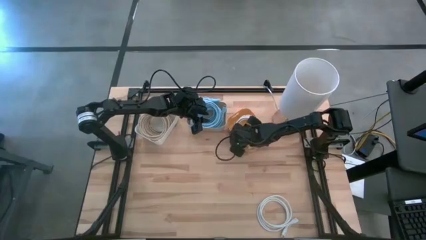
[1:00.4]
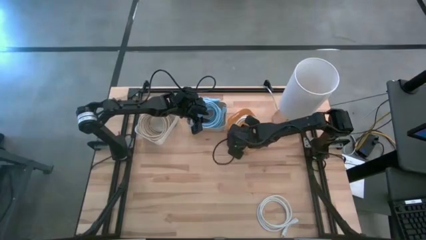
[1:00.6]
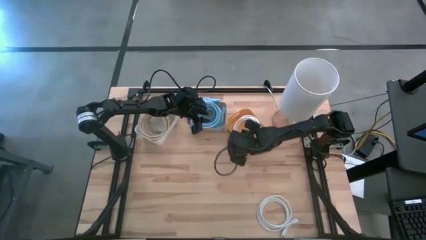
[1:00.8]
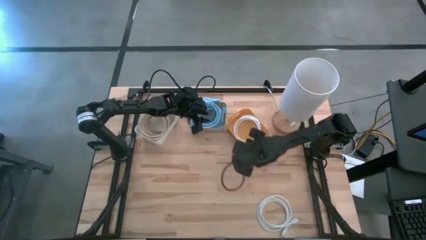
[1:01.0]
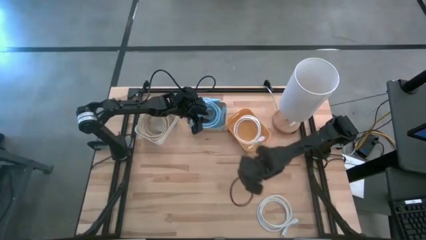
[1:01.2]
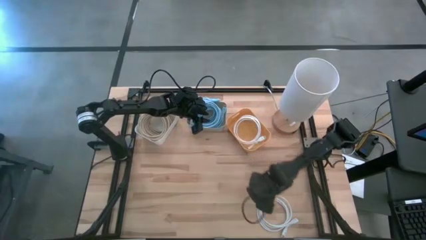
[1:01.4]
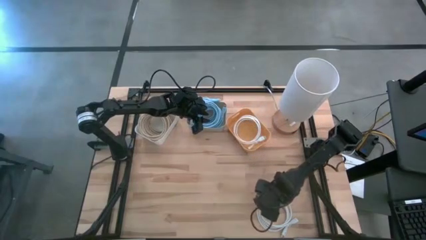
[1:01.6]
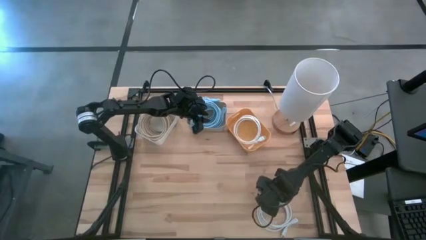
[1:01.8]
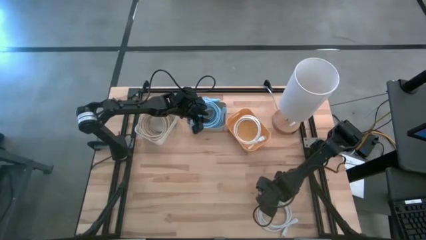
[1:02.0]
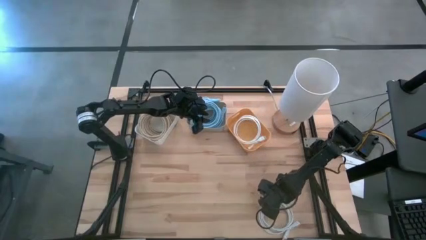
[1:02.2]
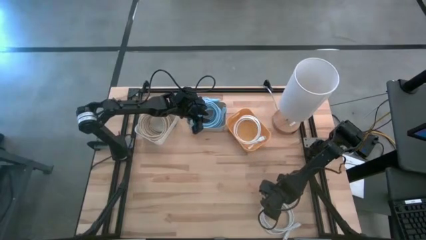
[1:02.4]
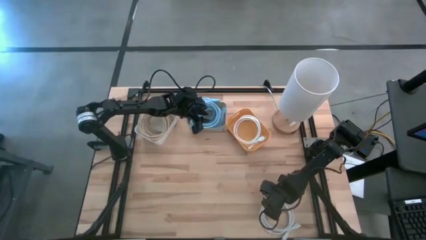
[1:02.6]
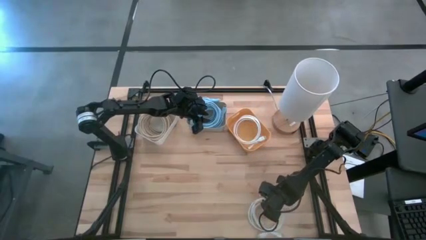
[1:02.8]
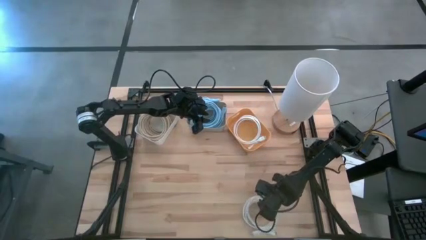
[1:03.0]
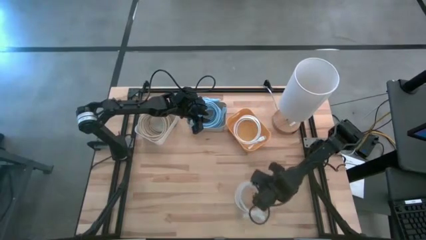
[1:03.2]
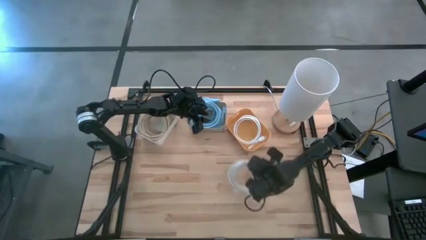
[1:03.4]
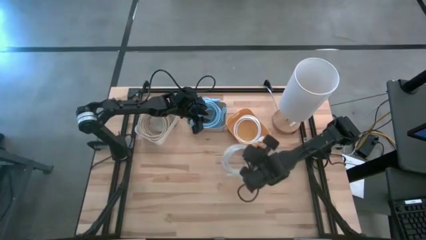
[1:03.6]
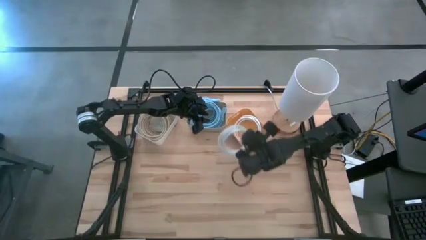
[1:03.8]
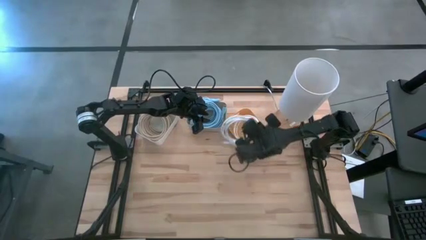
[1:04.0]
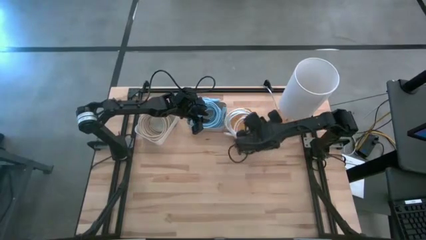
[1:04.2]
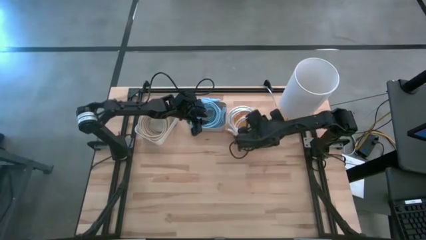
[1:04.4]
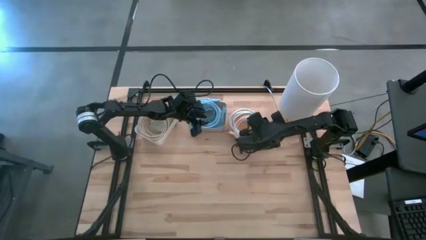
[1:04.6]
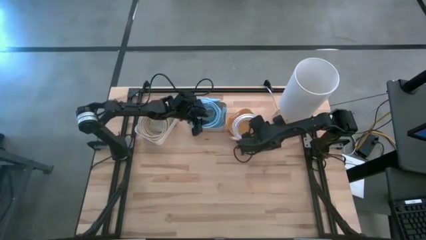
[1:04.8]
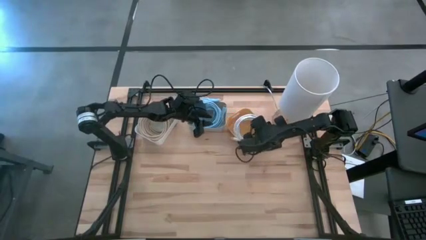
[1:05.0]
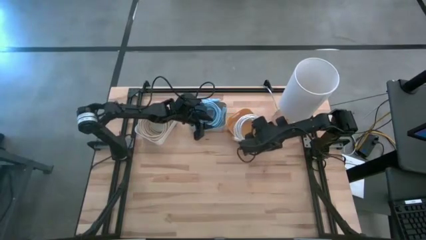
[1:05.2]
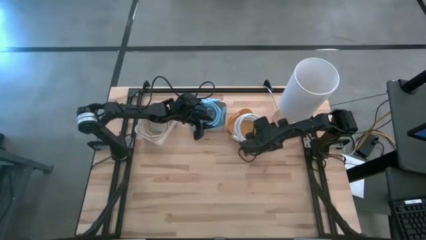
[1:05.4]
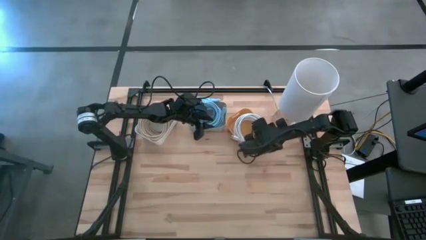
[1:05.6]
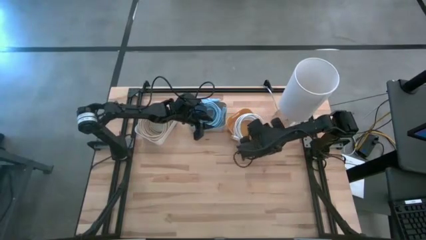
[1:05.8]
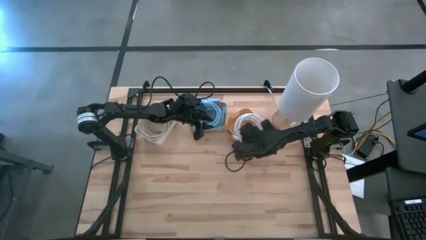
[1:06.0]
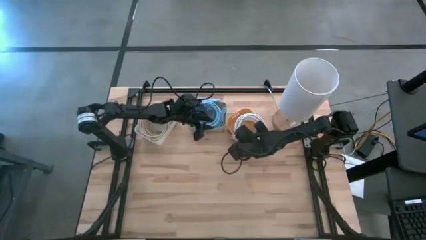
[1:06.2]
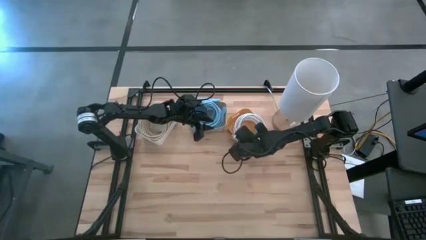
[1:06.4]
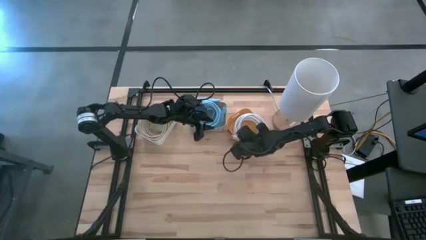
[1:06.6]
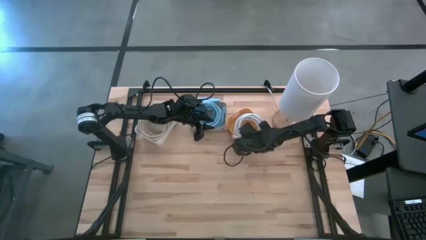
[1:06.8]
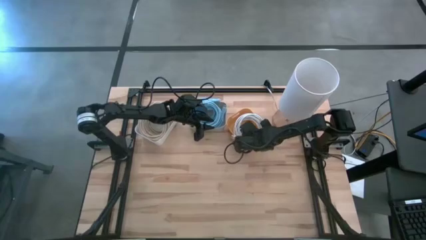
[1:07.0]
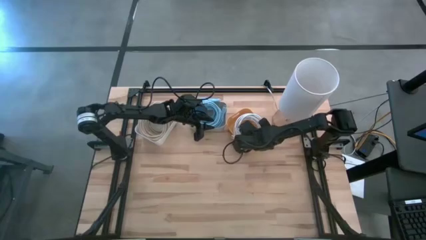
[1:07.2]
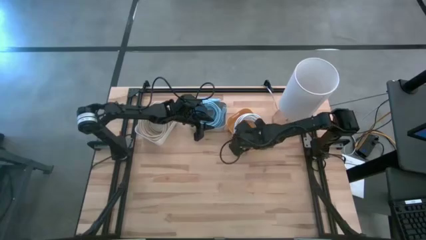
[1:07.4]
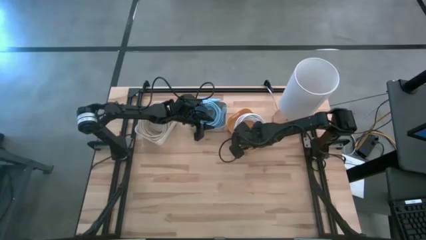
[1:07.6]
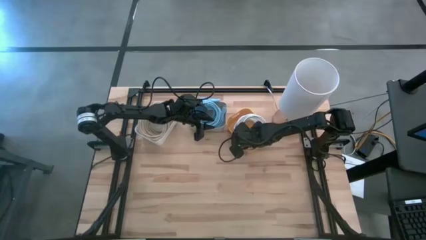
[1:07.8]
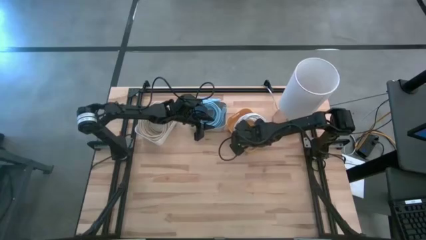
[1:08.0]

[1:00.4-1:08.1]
Task: Sort HDMI cables
Put the white HDMI cable into the yellow bin

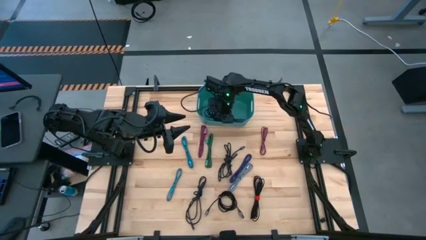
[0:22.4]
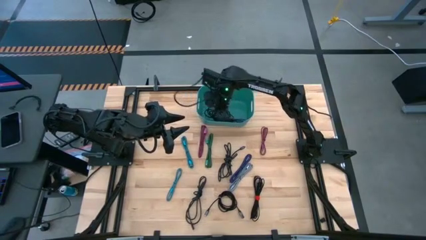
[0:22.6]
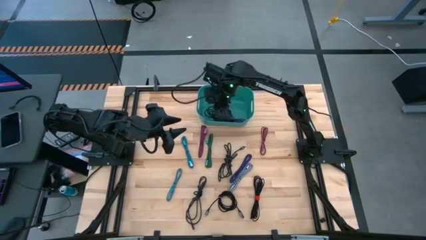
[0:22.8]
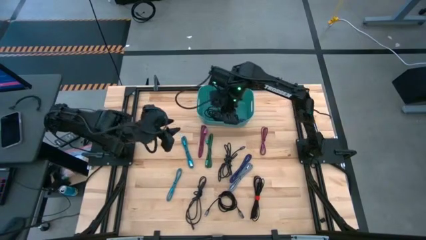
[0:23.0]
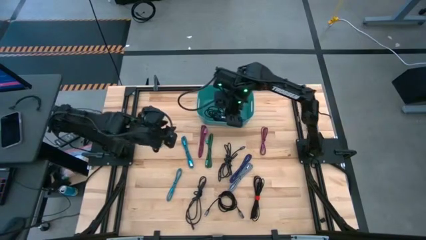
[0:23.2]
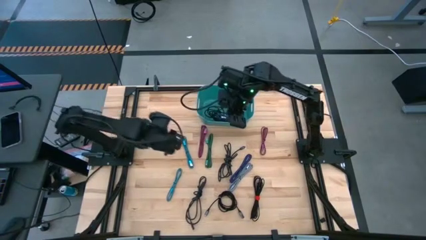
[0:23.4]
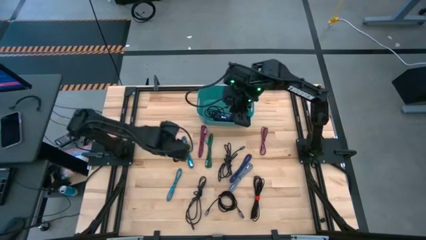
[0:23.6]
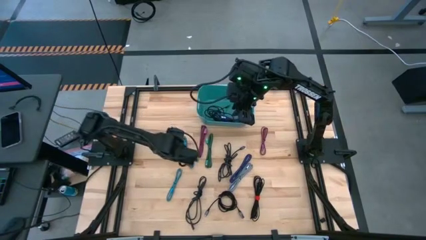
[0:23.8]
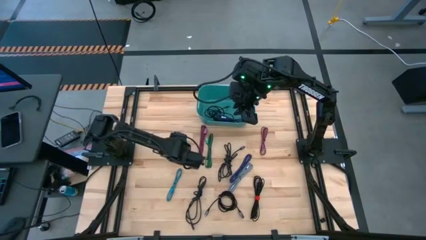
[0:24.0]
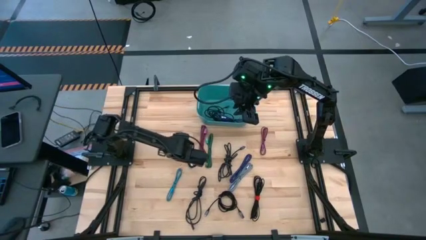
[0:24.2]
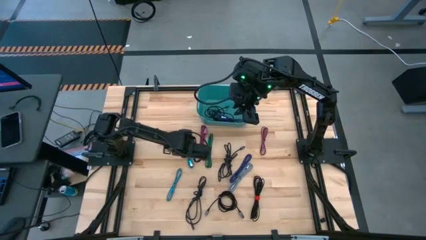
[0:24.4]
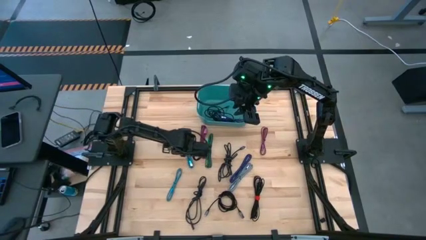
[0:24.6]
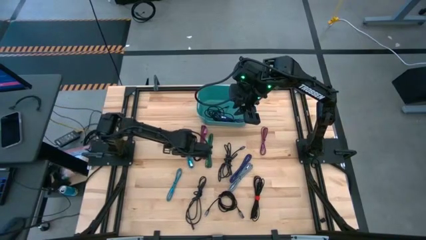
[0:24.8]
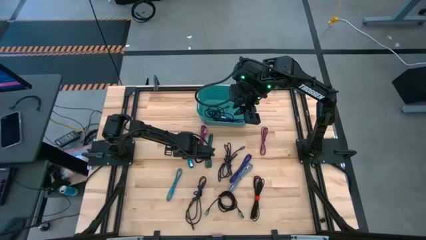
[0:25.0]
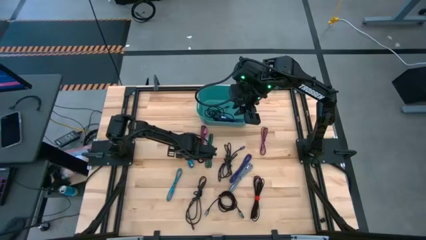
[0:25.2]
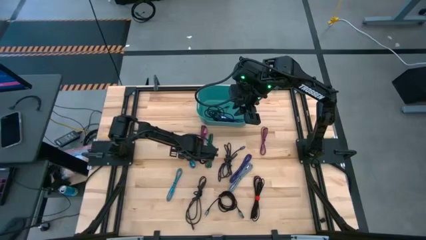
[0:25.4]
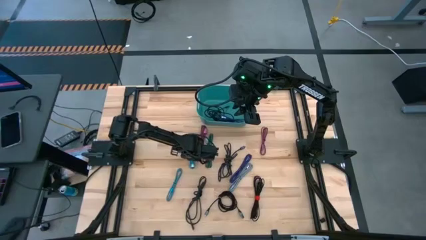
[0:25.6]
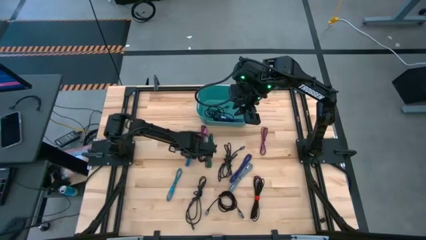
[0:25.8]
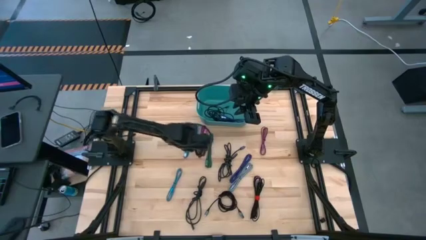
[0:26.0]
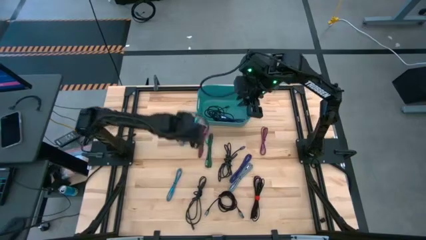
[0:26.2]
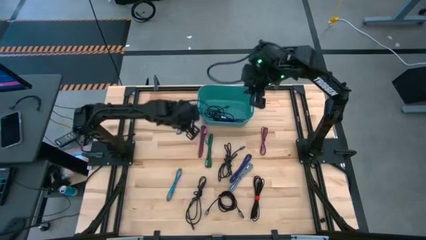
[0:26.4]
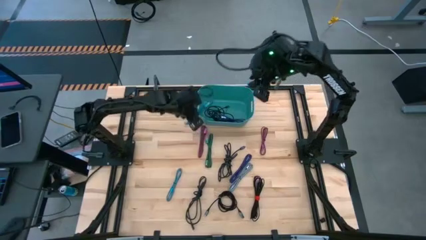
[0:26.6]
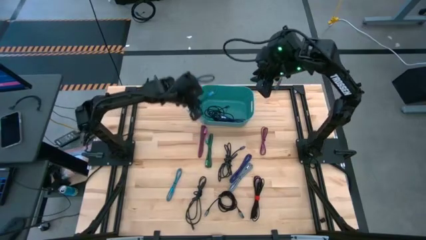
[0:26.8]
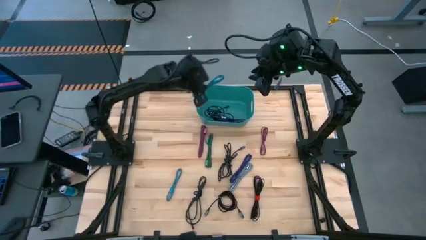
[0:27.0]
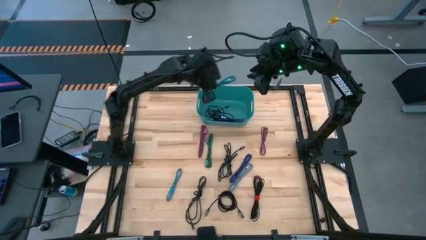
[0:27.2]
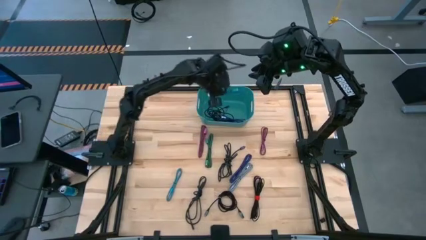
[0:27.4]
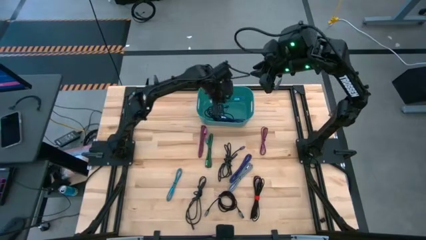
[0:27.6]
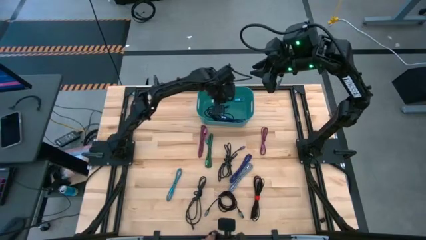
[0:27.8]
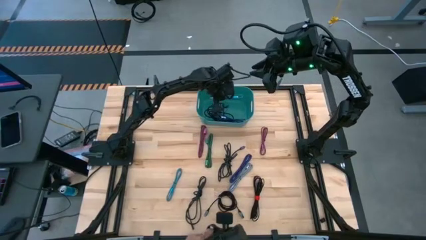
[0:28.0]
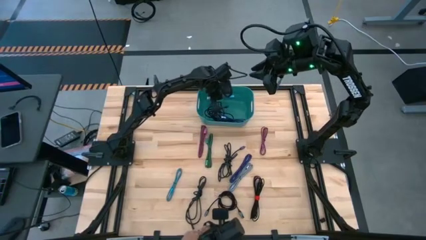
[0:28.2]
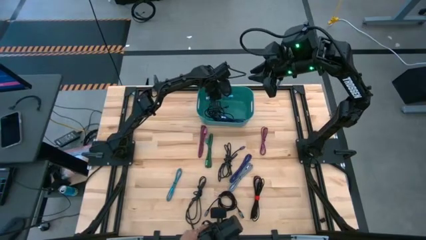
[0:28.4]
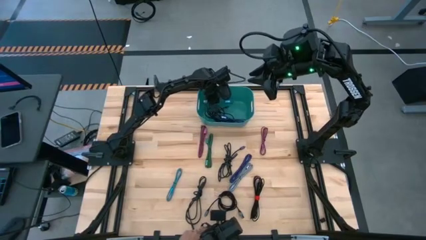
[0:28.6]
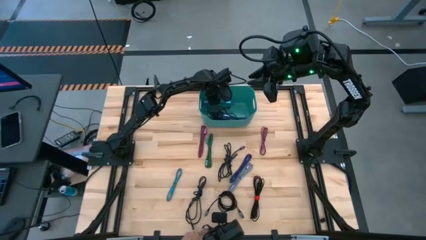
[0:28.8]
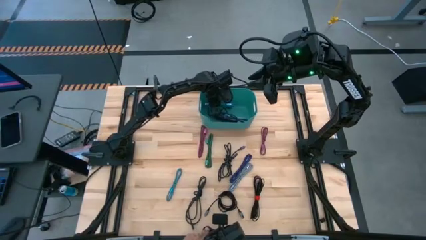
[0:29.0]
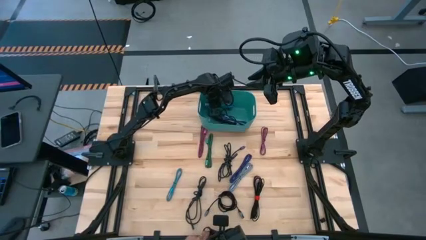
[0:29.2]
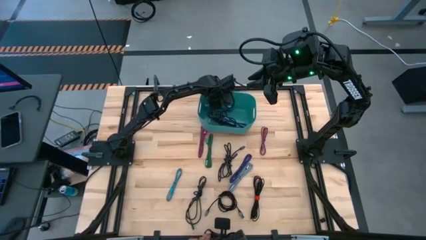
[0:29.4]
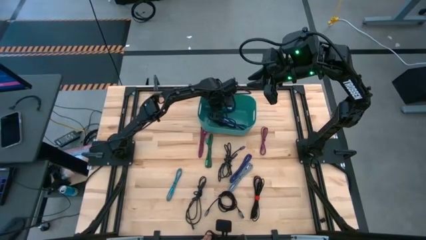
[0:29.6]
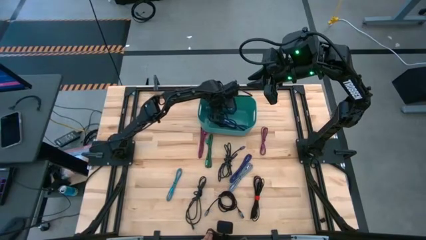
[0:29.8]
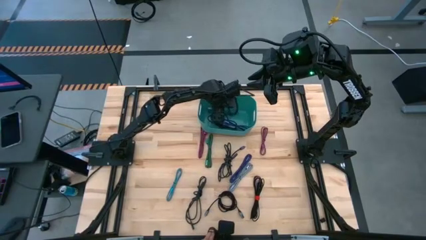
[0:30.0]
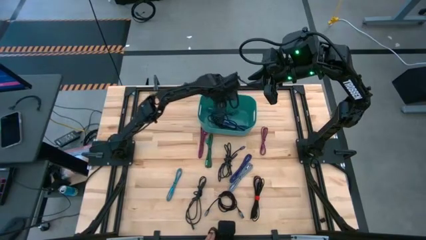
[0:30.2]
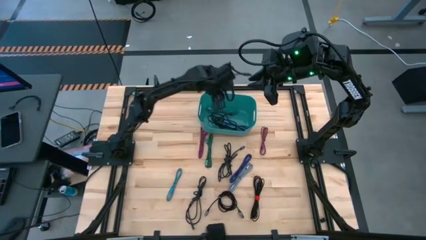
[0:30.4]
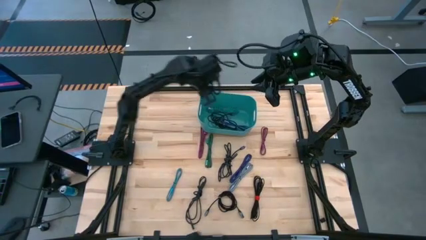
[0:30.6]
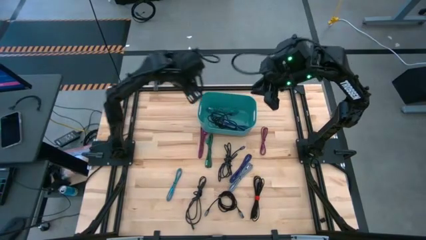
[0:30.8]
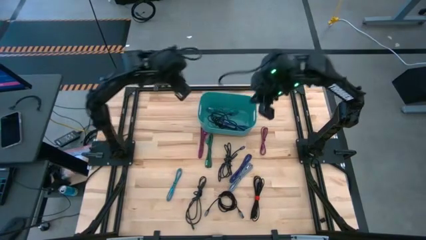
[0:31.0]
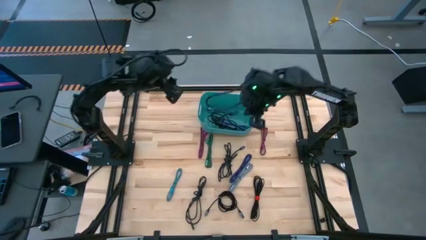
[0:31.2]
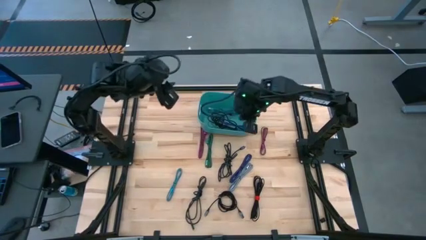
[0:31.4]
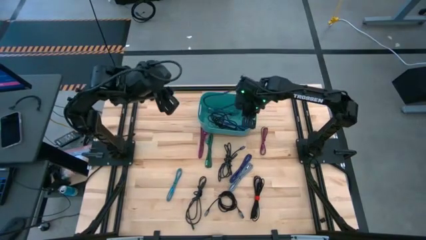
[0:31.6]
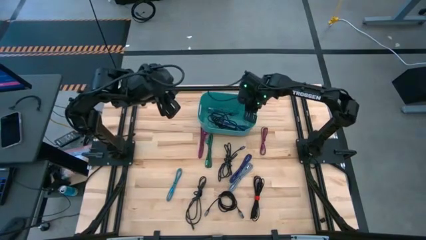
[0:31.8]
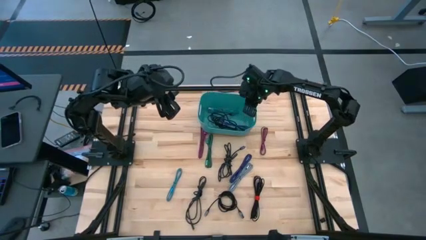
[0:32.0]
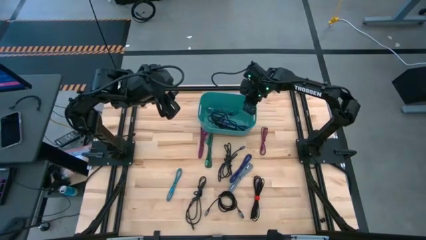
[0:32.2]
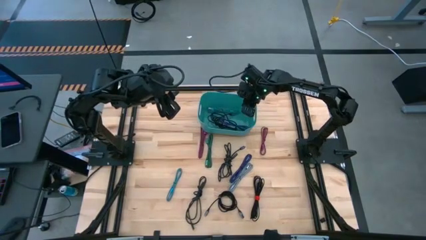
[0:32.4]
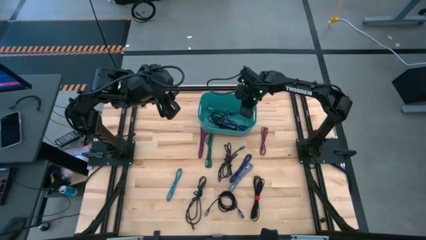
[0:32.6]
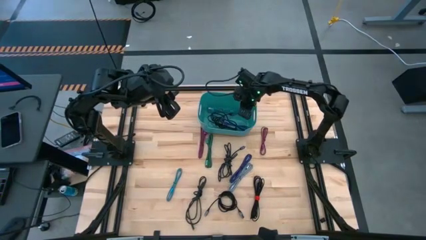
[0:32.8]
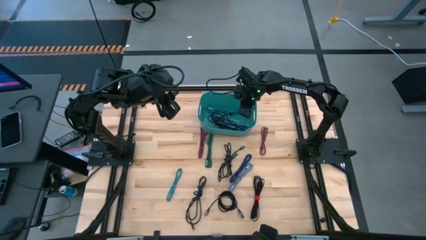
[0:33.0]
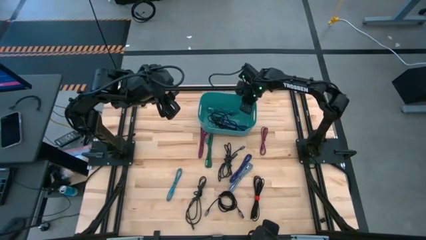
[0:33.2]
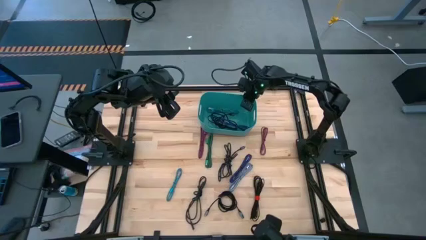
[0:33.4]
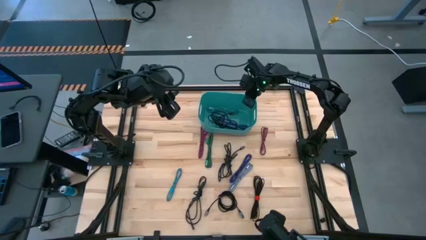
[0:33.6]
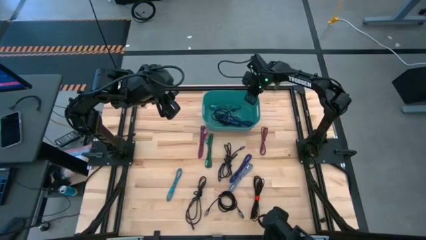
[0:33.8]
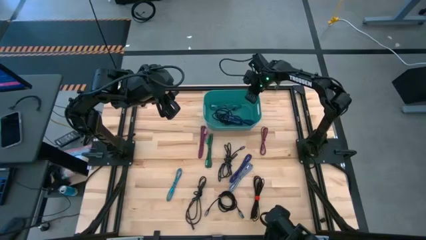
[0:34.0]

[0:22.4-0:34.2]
Task: Pick and place USB-C Cables
Put the top blue charger cable into the light blue bin
